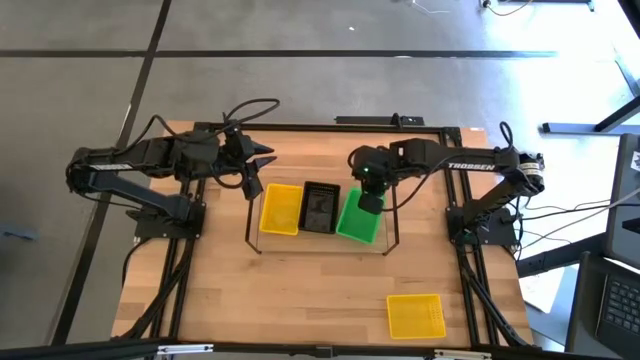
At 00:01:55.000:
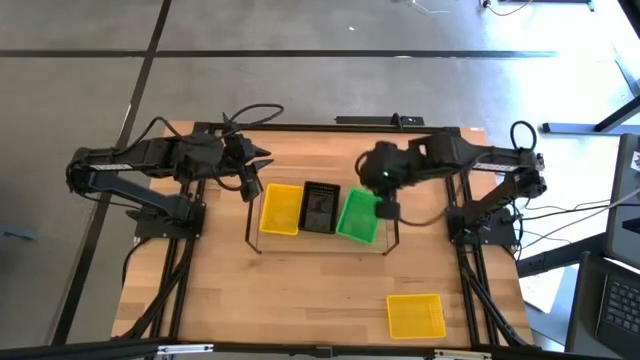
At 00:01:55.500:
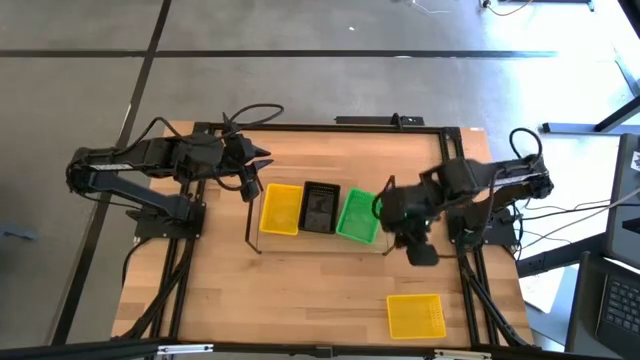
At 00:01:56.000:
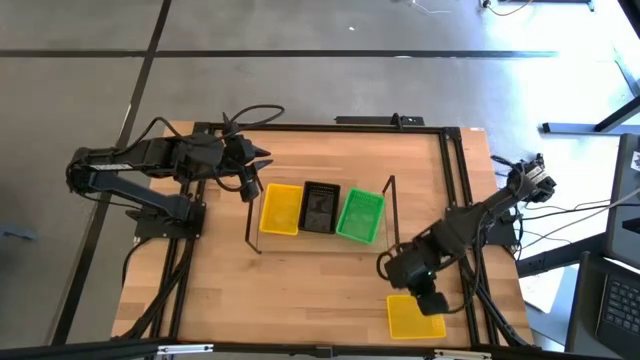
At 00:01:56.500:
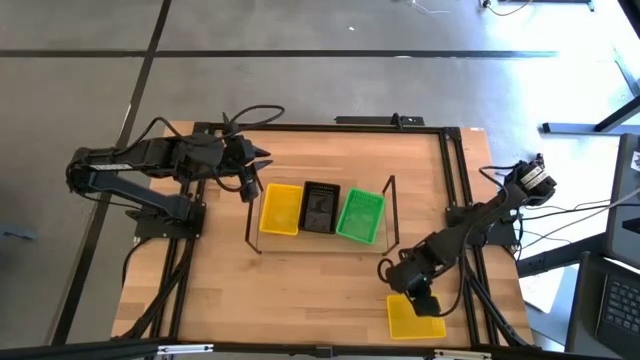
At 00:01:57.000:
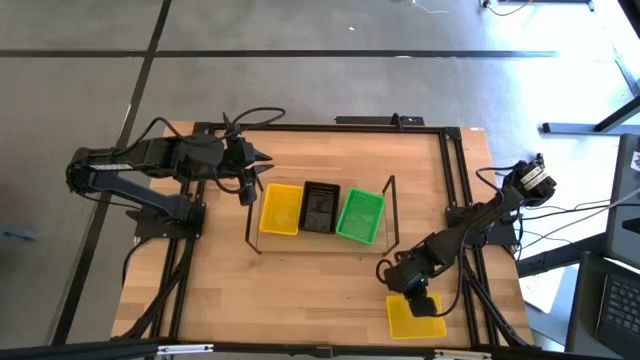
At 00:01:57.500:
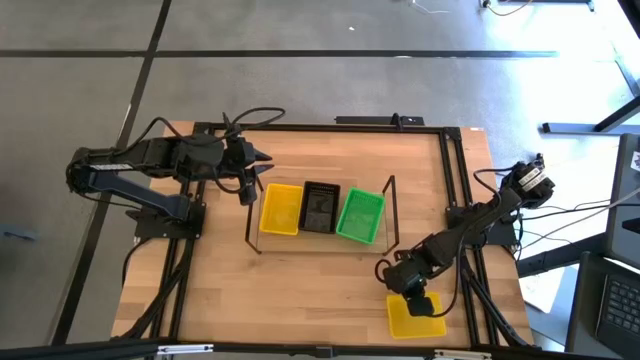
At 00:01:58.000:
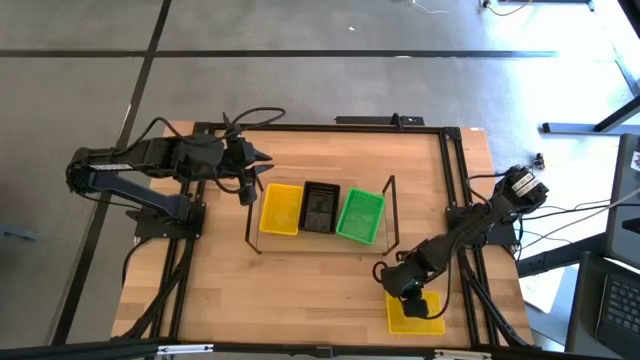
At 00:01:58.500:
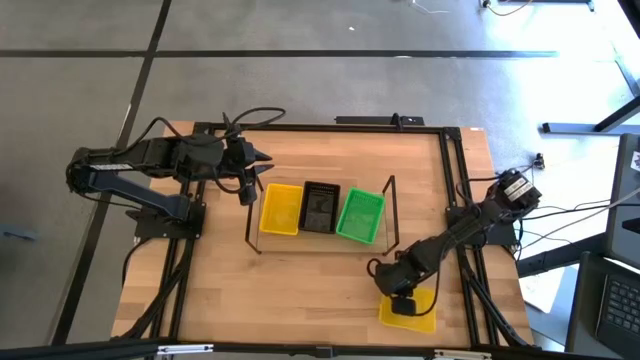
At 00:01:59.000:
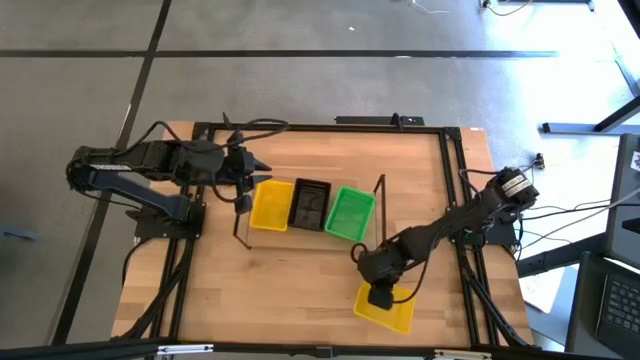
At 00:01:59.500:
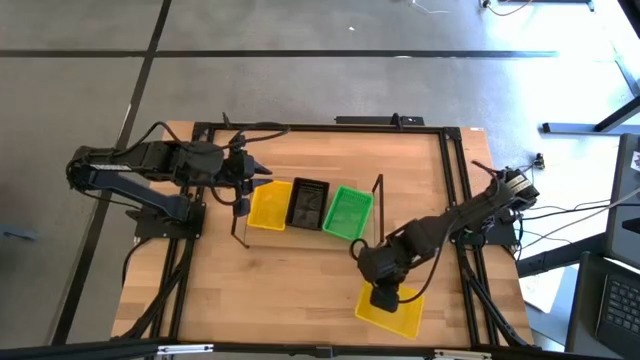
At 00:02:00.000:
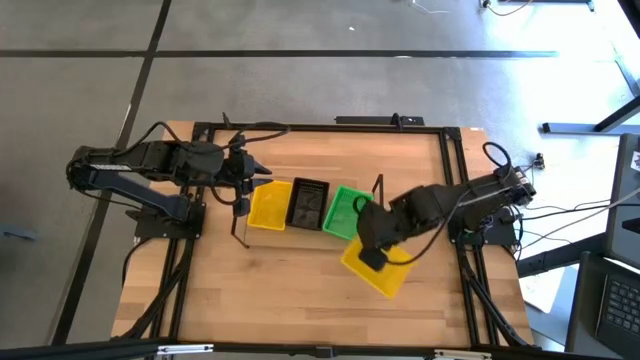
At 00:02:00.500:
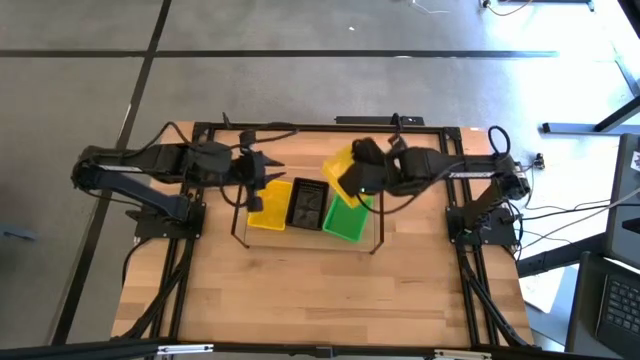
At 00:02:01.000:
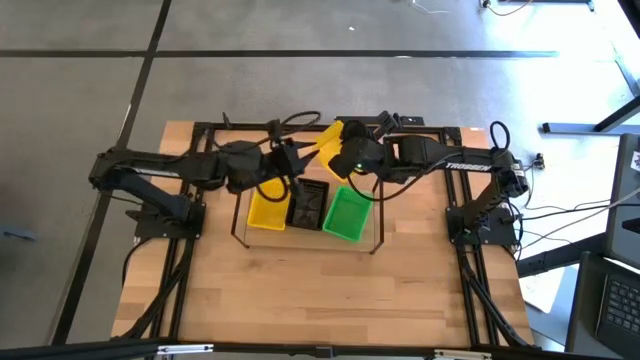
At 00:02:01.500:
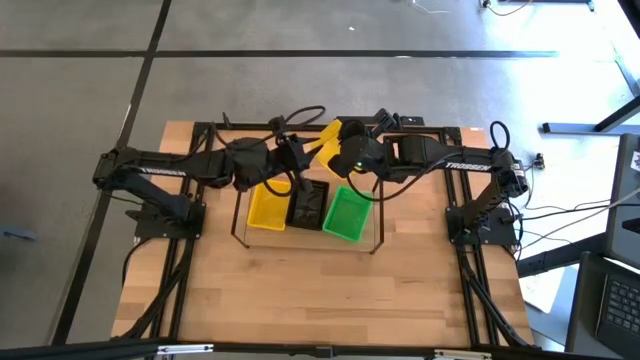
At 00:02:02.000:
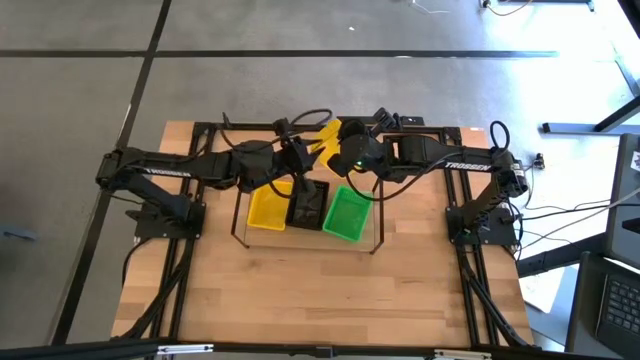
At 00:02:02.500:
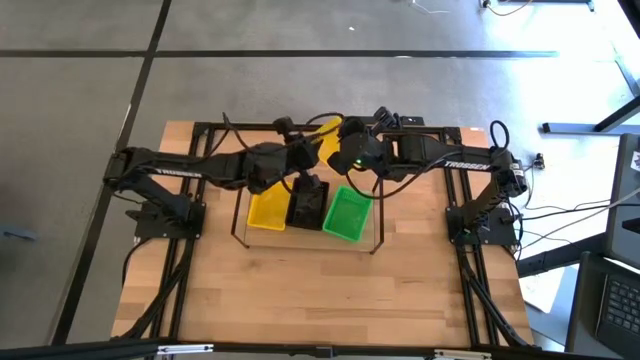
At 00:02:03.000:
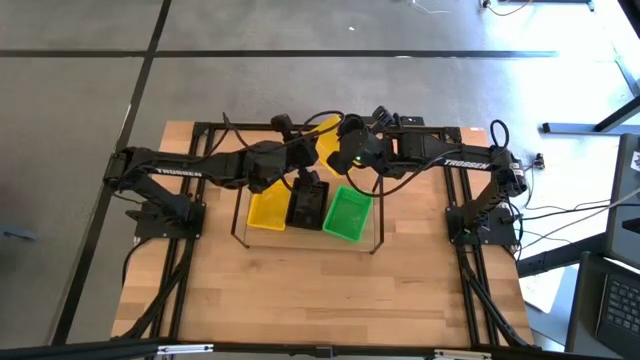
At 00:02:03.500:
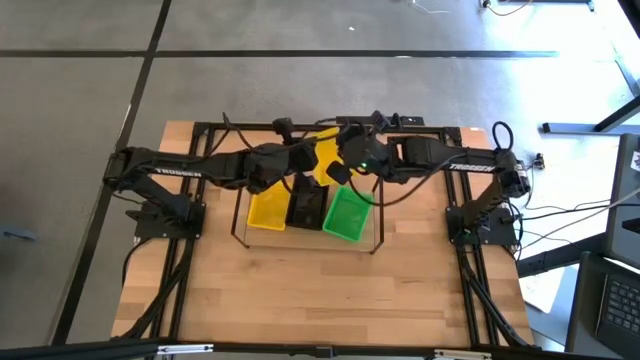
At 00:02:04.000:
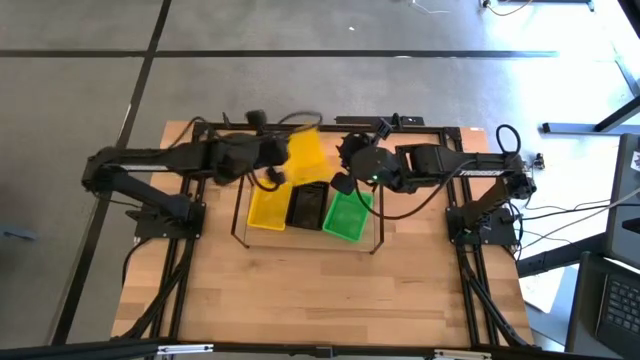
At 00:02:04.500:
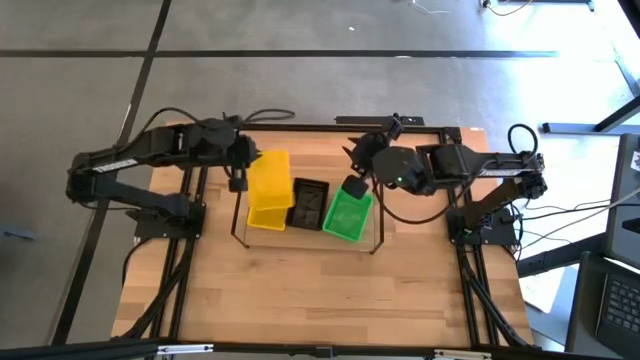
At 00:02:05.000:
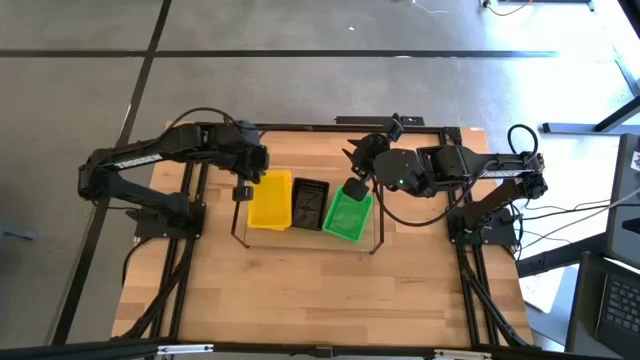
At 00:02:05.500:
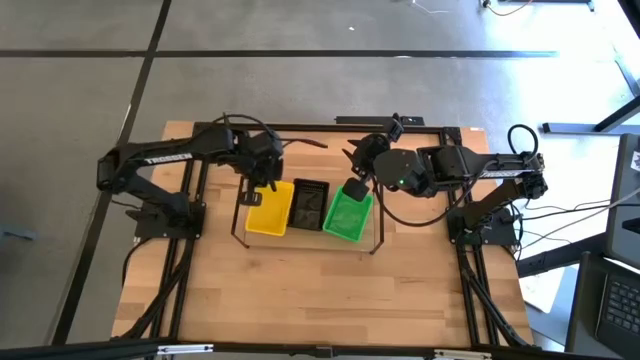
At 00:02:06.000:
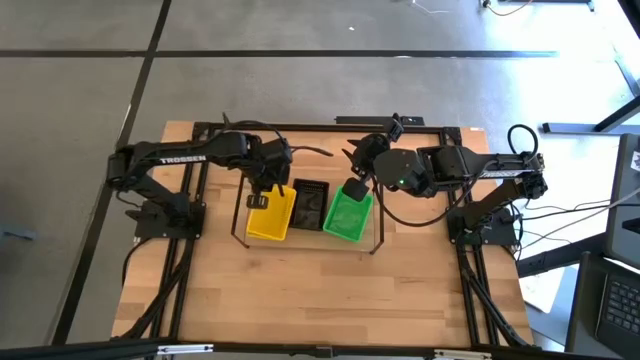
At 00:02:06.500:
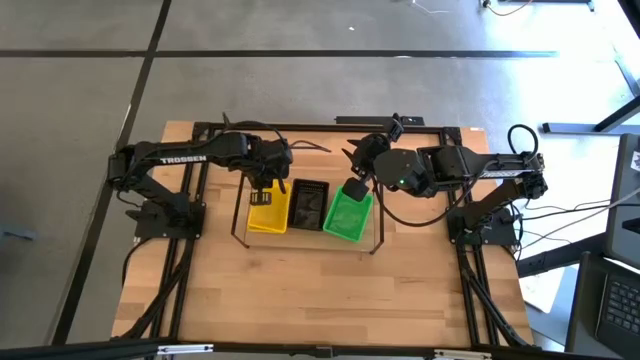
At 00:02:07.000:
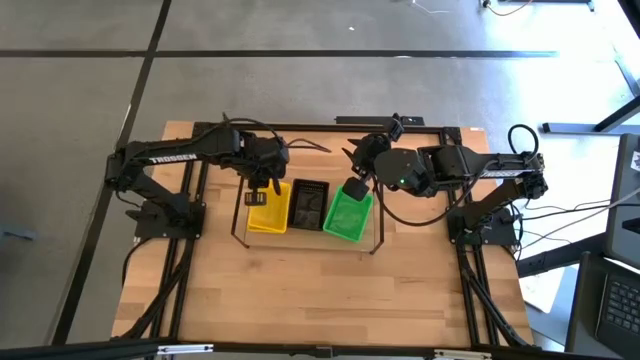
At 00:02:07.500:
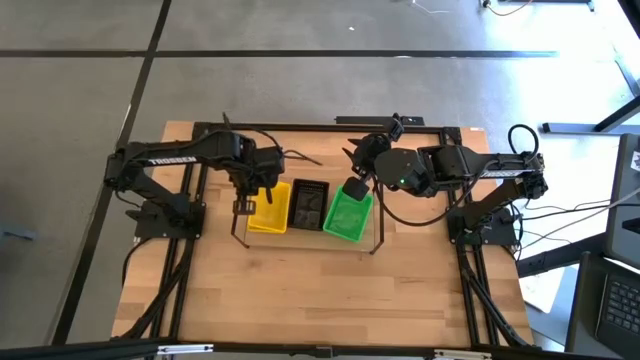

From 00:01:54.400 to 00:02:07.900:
Task: Stack baskets on shelf by color
Stack the yellow bin on top of the yellow bin on the shelf

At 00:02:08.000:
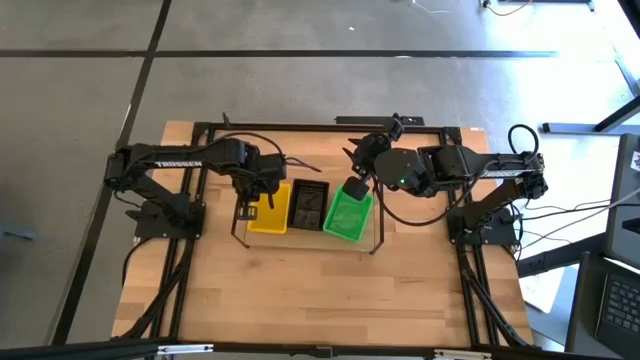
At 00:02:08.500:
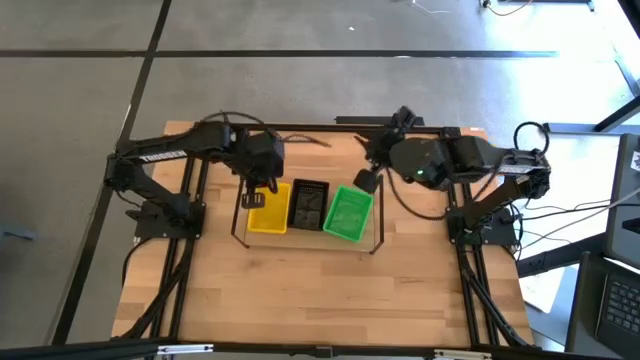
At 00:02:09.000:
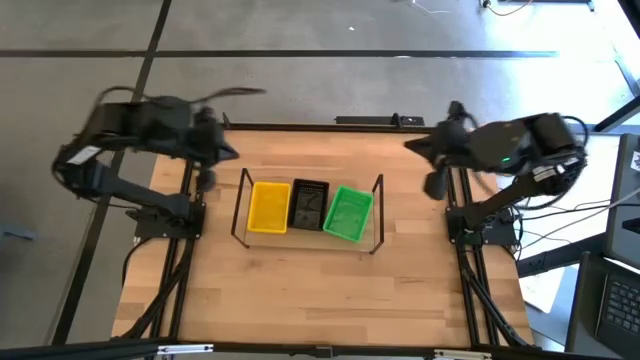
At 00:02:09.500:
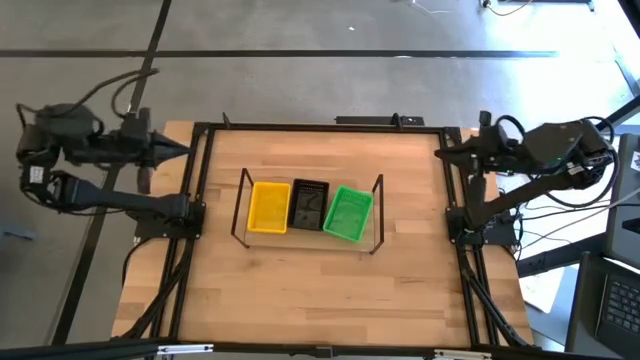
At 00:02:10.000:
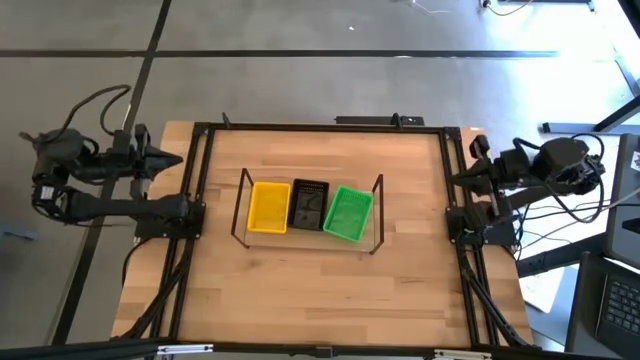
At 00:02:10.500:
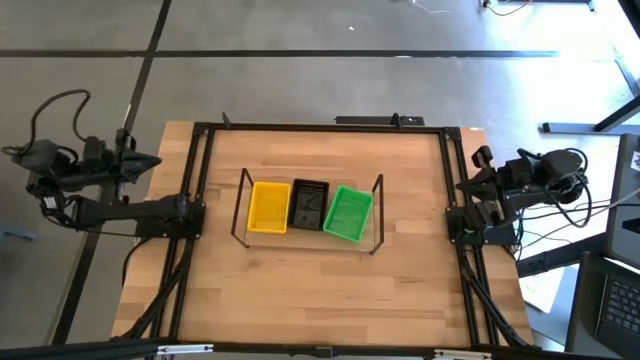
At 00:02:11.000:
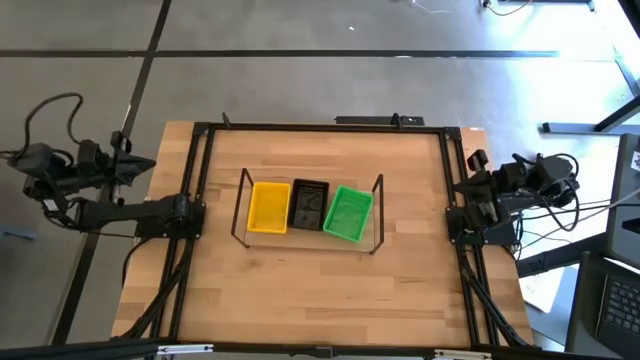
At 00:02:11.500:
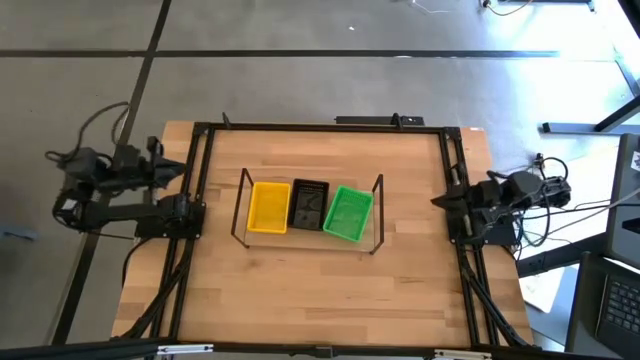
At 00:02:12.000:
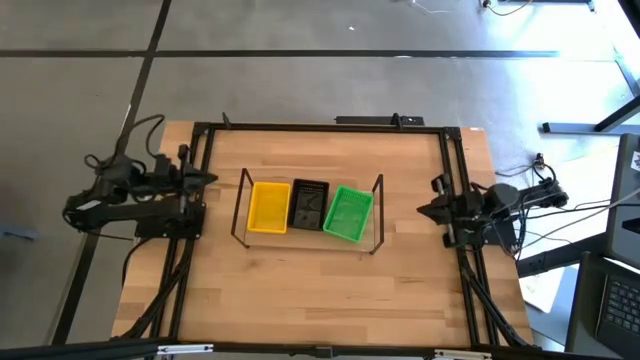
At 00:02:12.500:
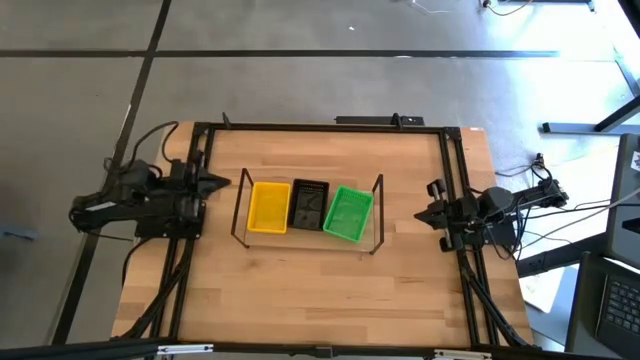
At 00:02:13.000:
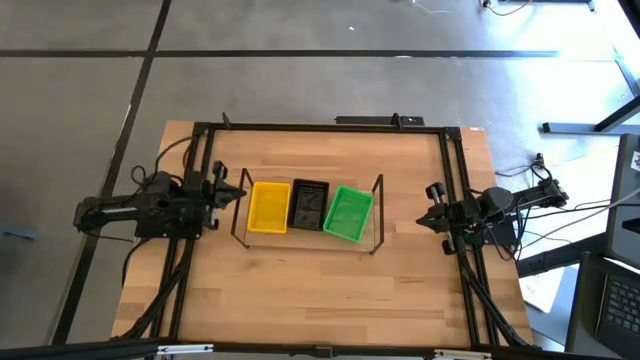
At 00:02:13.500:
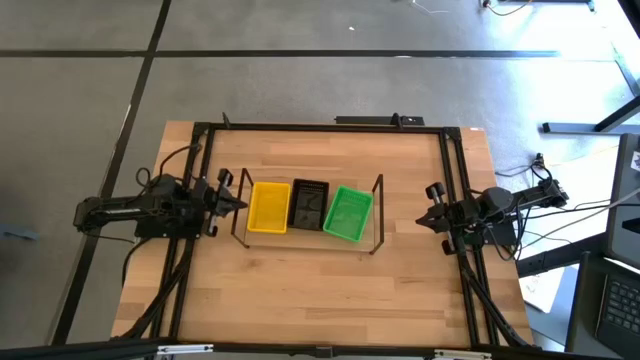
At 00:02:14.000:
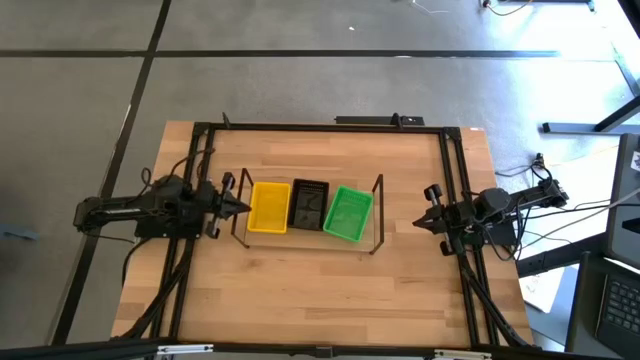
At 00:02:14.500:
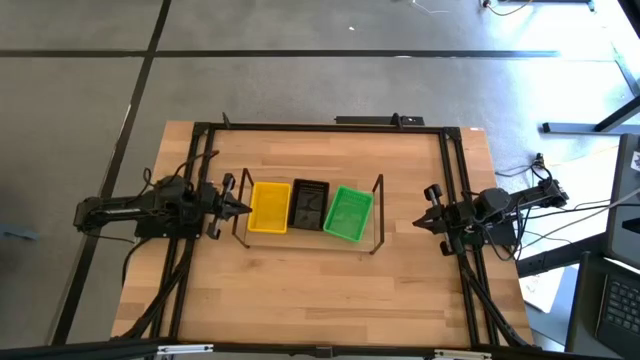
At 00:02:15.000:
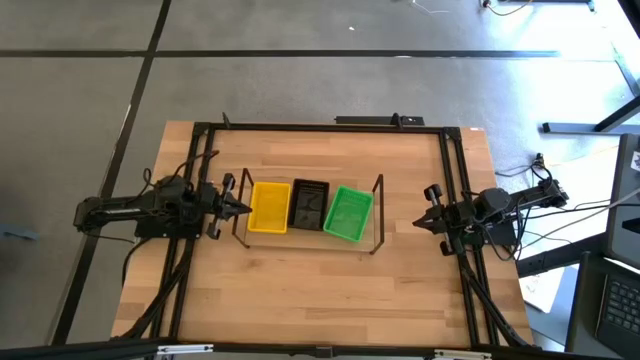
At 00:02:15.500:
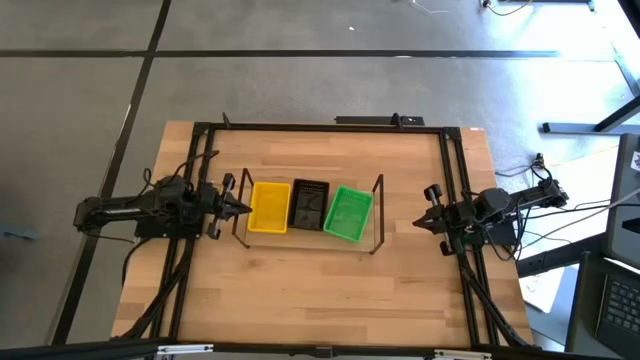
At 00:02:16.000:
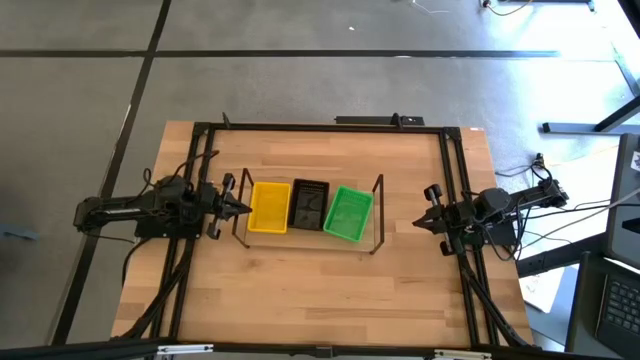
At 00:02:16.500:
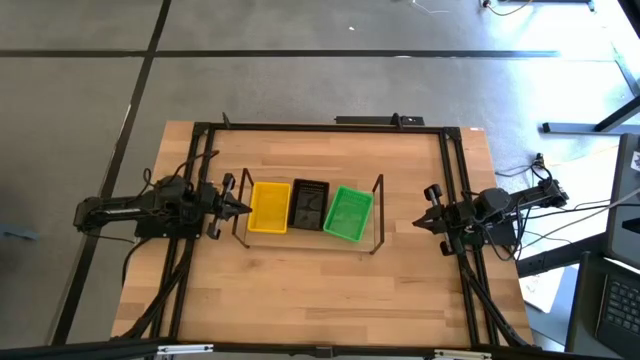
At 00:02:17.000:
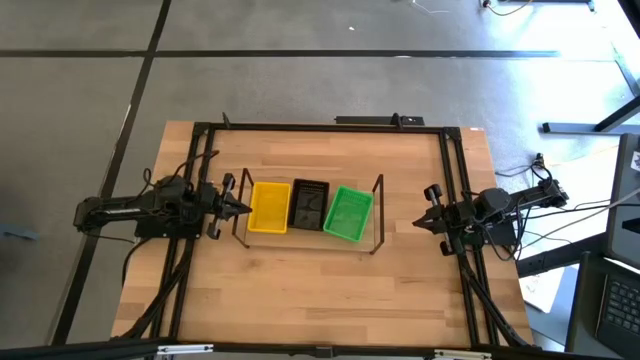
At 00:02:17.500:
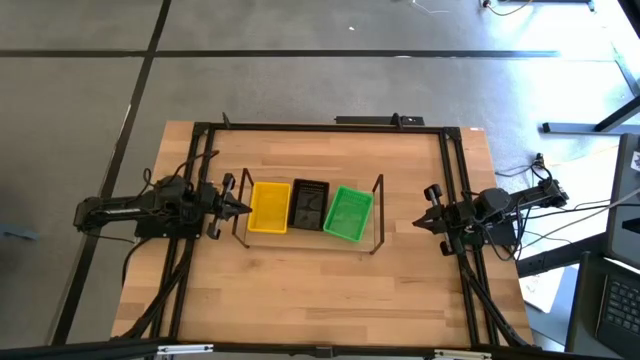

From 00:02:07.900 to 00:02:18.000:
Return to Home Position
